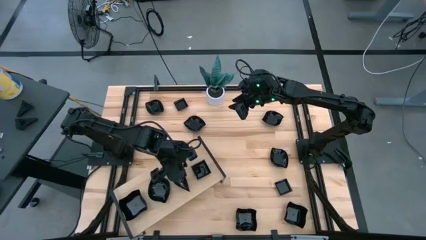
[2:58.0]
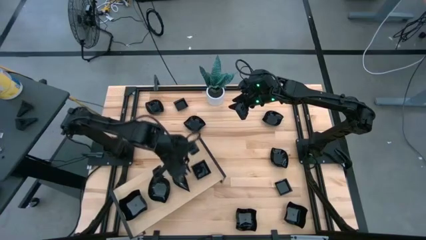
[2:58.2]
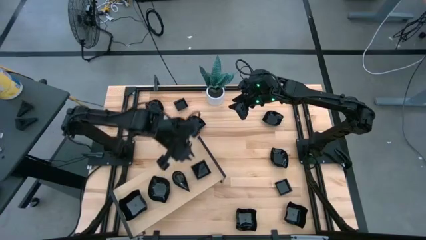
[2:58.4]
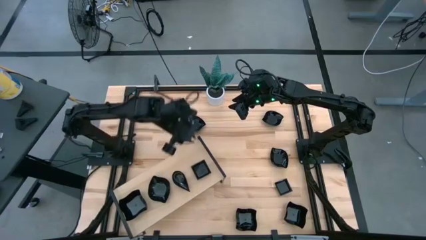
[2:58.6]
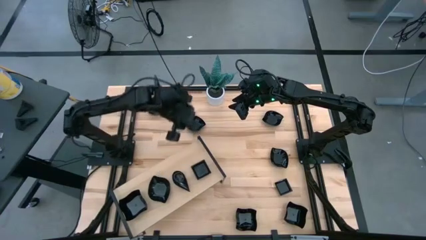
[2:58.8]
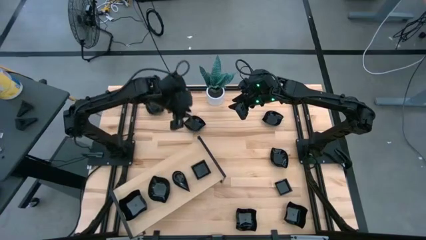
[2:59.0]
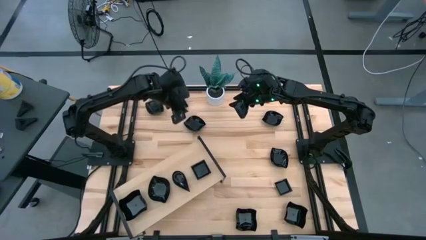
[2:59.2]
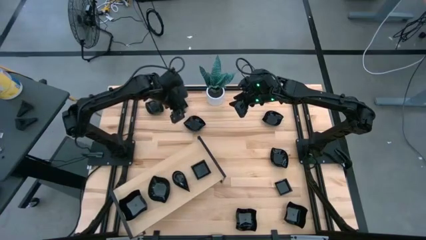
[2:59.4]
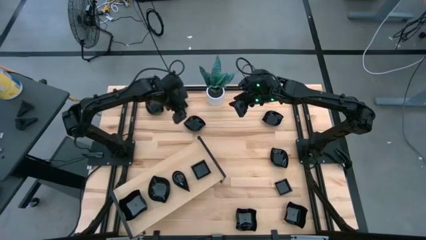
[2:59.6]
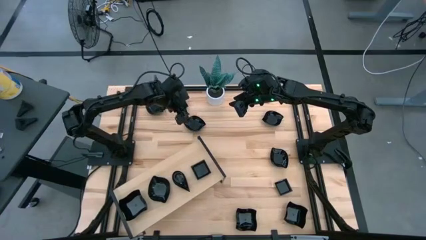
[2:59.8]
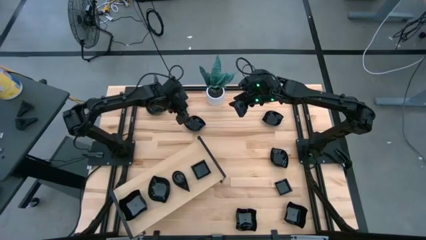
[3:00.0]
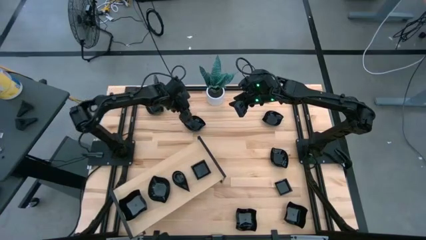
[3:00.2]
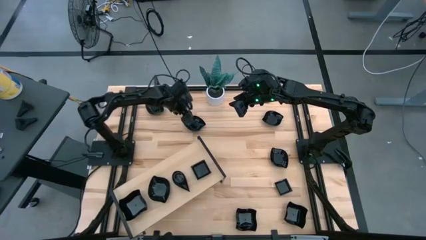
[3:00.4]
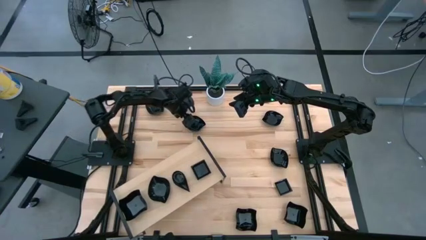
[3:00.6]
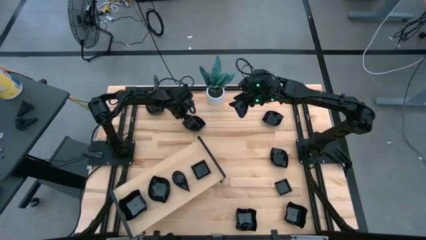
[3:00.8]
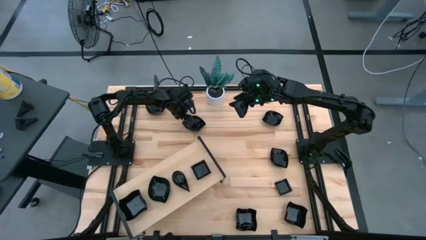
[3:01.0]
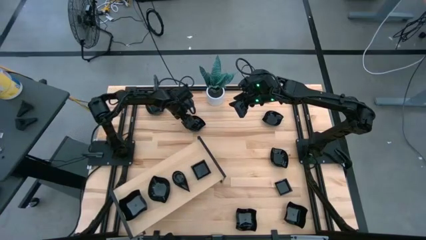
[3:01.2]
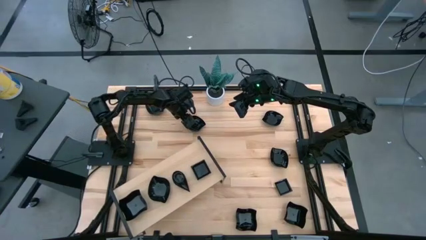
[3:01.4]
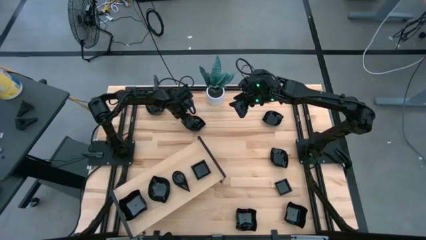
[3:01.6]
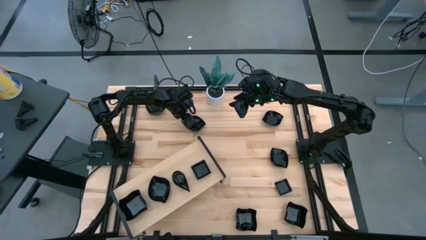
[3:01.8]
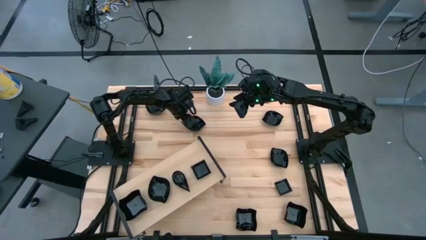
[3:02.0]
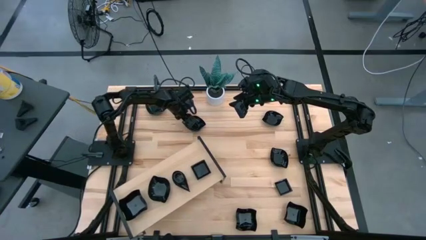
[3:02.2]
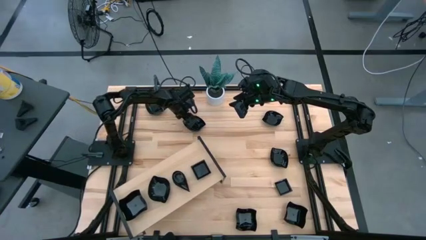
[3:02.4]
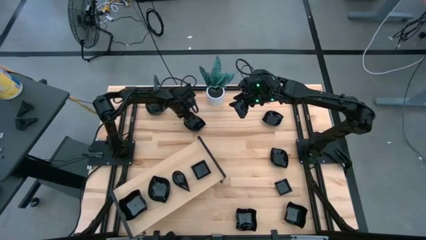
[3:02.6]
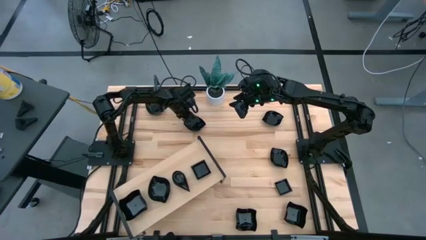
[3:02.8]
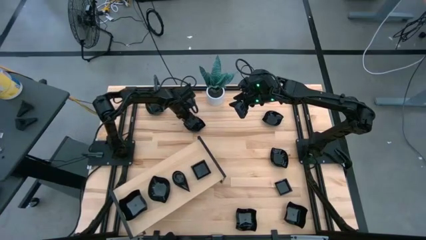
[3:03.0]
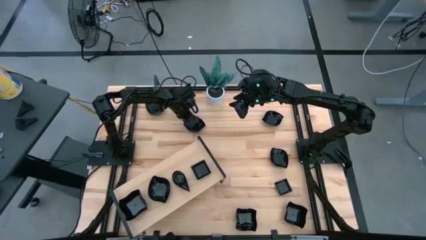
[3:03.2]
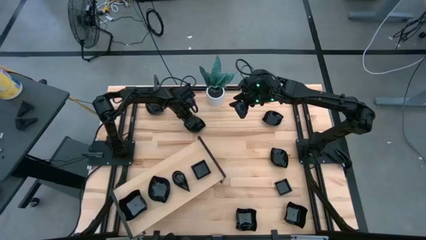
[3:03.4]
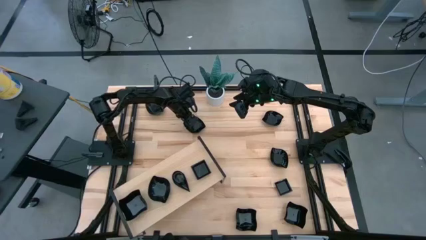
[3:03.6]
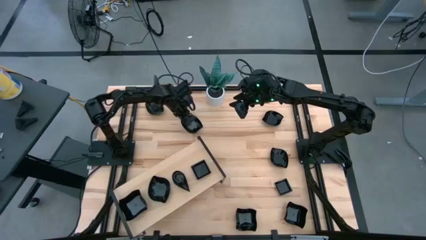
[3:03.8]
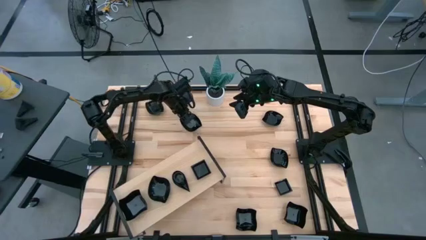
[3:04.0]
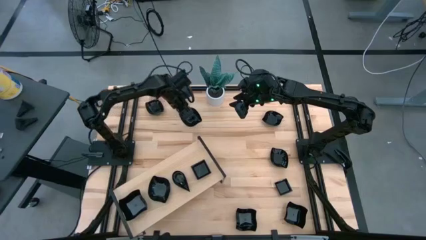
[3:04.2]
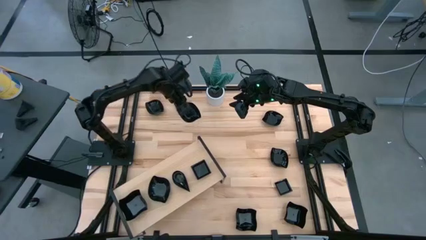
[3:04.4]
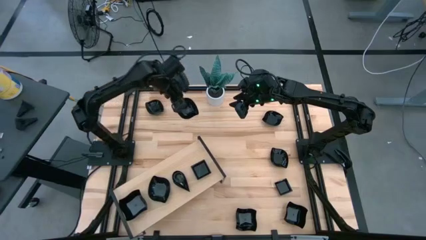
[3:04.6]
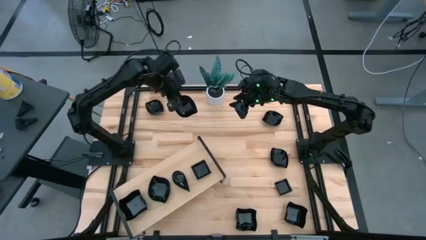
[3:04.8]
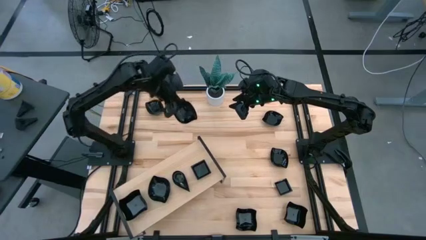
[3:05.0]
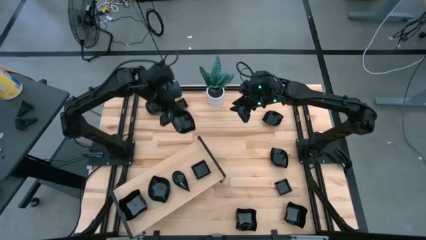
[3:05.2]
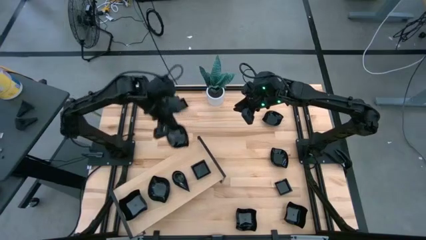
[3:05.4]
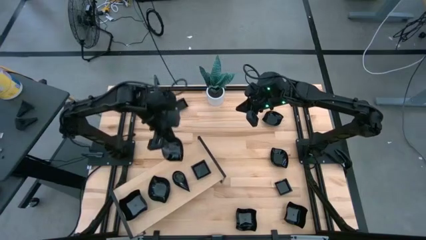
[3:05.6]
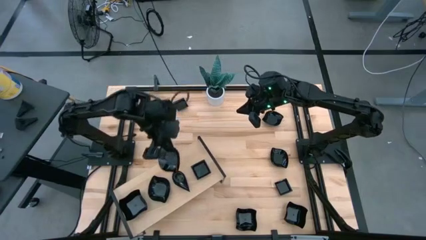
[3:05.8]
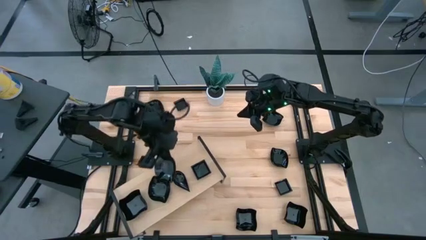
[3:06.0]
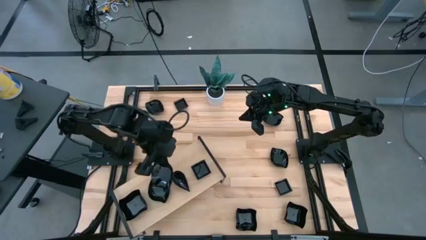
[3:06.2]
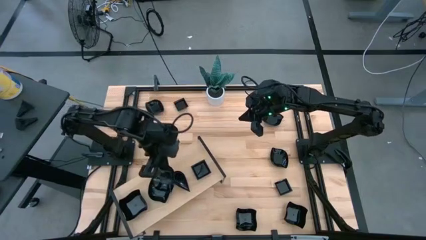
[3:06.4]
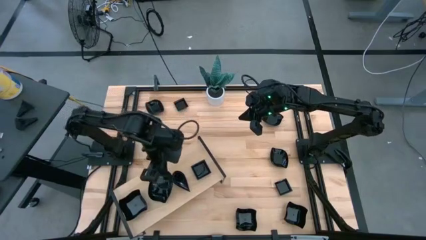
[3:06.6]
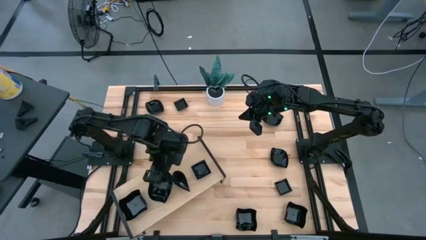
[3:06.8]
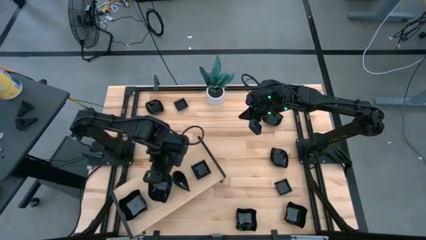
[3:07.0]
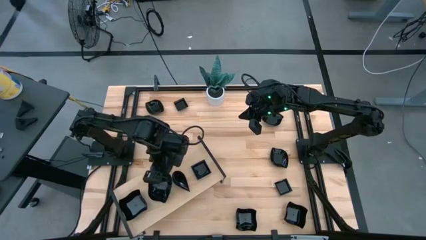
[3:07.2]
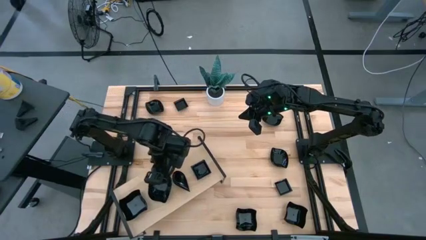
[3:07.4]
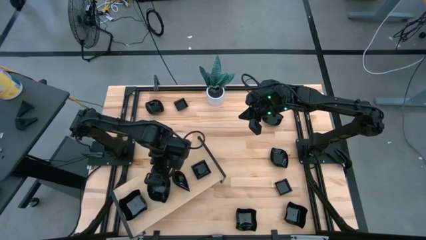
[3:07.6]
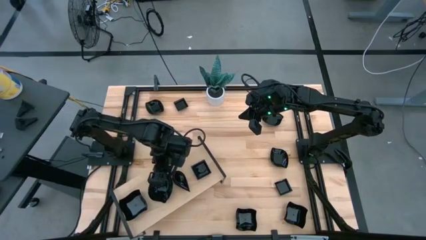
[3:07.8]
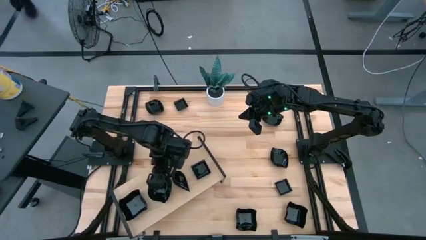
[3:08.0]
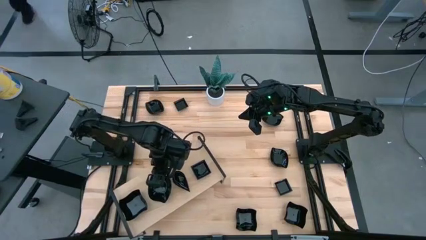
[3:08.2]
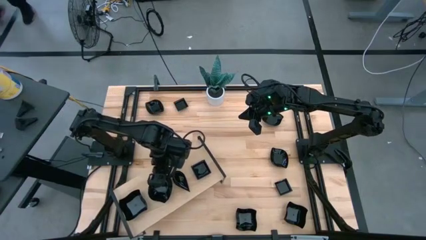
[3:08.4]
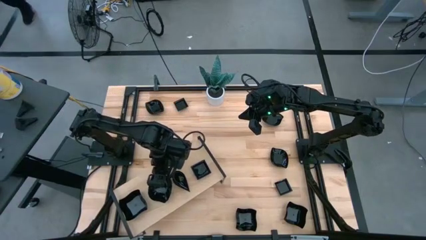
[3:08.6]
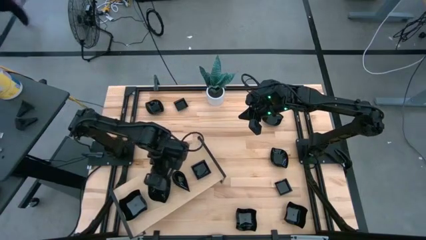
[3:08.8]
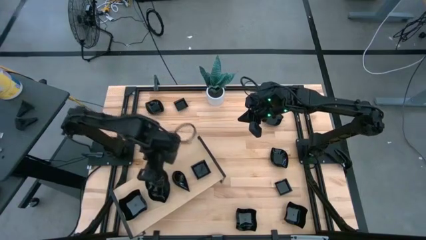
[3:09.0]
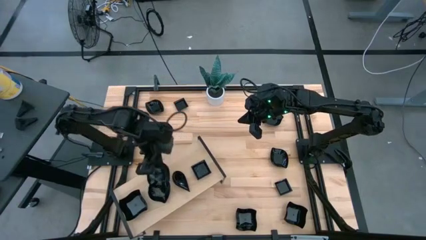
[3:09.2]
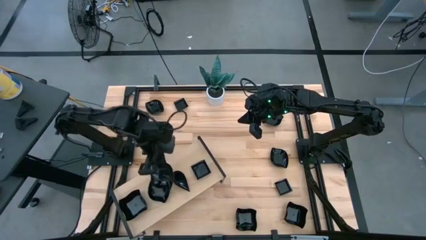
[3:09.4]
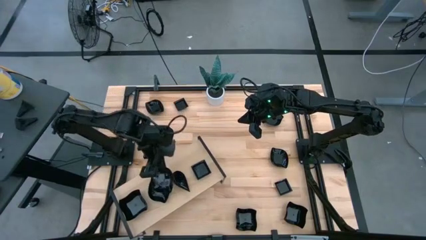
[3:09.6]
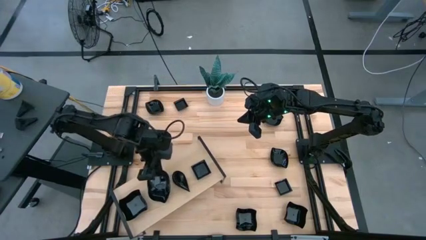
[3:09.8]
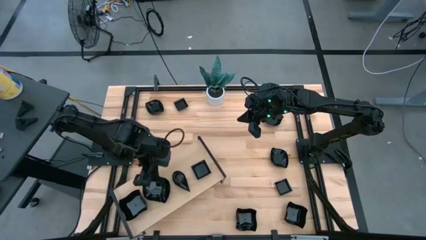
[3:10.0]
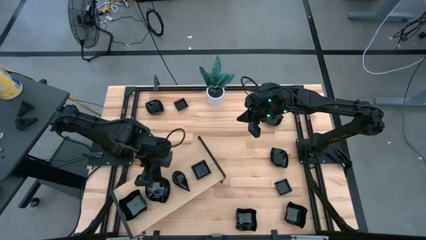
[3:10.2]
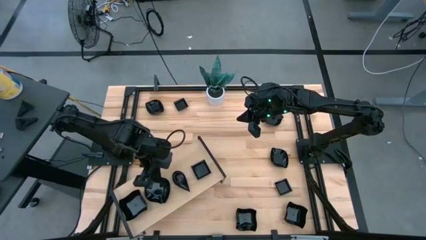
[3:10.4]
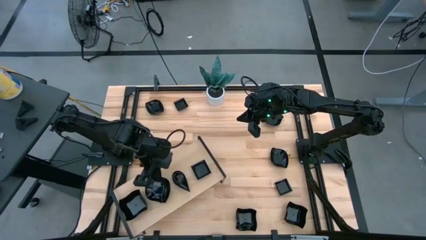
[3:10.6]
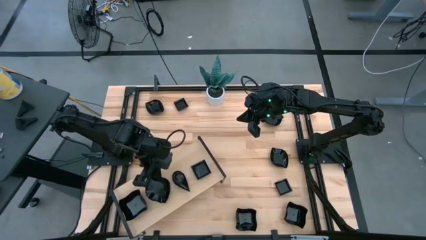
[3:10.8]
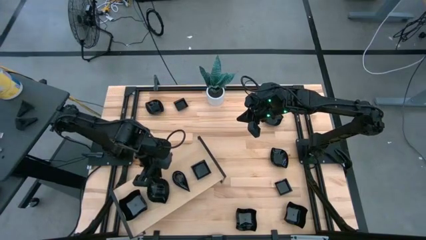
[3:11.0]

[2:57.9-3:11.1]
Task: Pick & Place Mini shaped plates
Stack the black leaf shaped plate on top of the black leaf shaped plate on the shelf

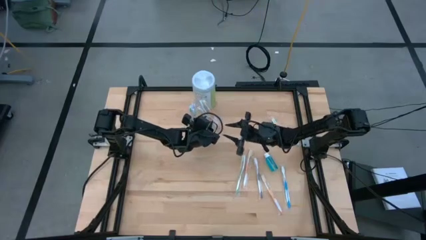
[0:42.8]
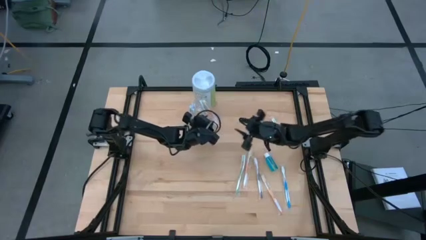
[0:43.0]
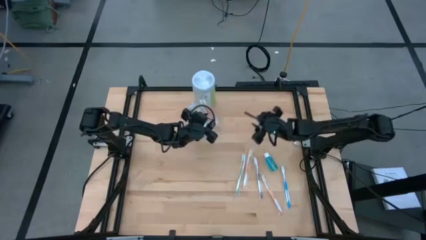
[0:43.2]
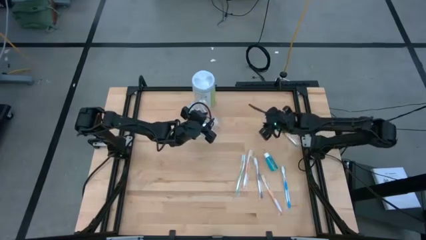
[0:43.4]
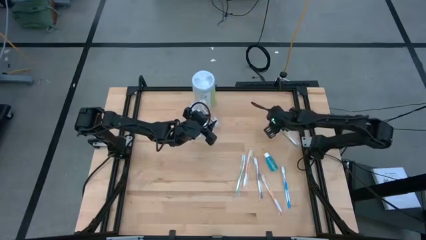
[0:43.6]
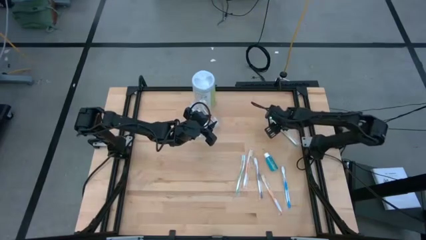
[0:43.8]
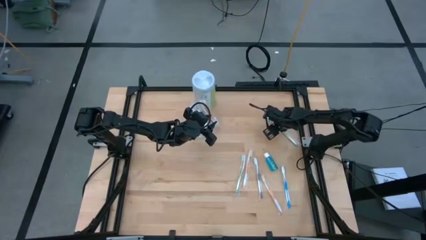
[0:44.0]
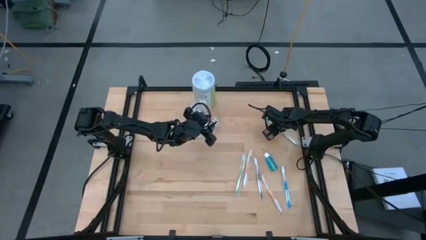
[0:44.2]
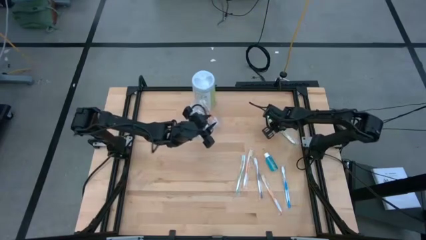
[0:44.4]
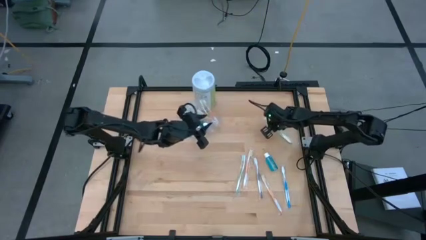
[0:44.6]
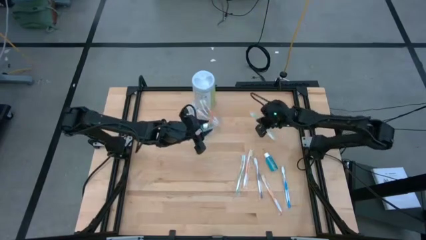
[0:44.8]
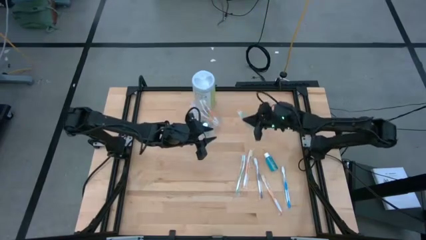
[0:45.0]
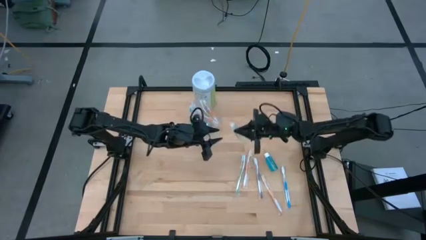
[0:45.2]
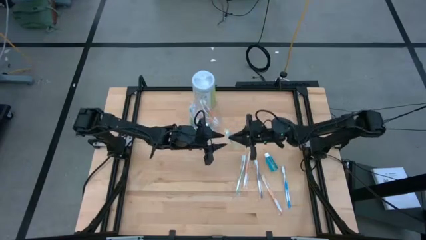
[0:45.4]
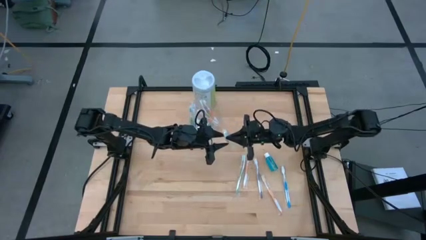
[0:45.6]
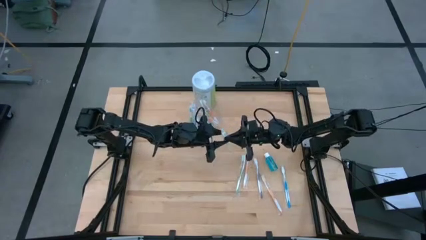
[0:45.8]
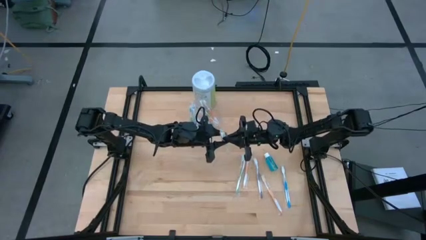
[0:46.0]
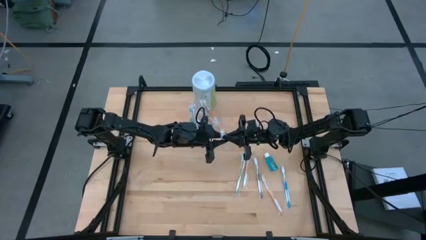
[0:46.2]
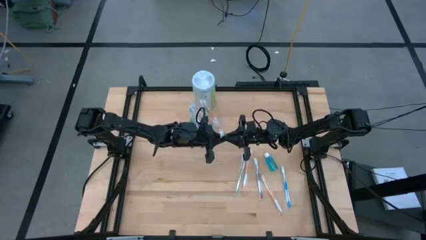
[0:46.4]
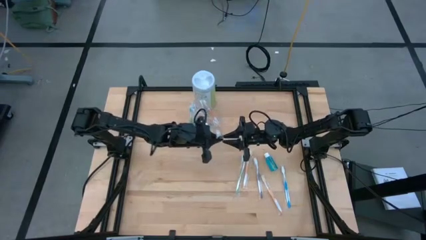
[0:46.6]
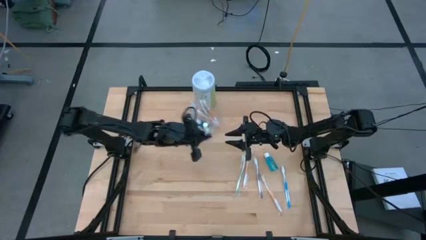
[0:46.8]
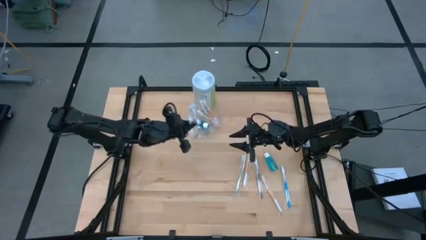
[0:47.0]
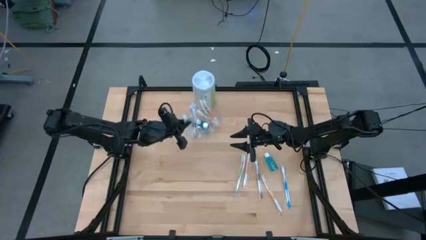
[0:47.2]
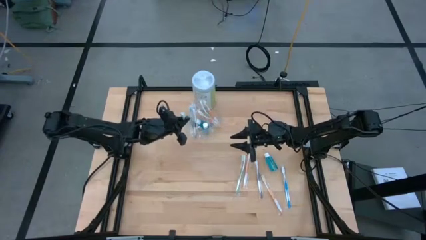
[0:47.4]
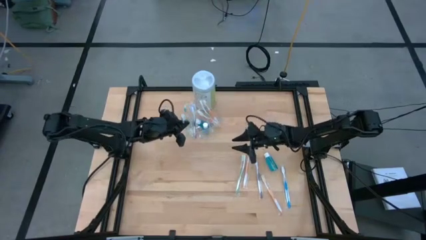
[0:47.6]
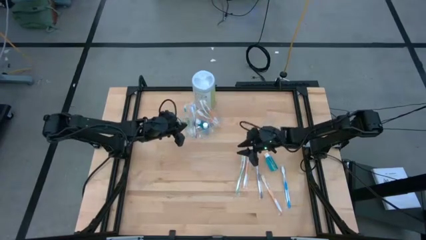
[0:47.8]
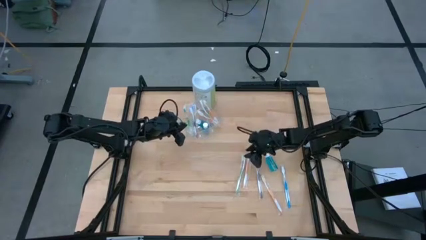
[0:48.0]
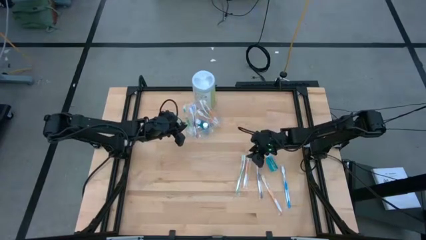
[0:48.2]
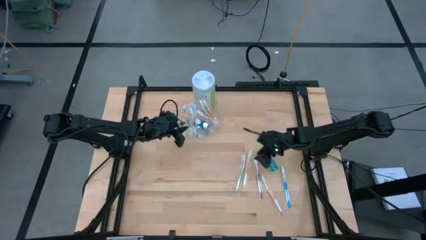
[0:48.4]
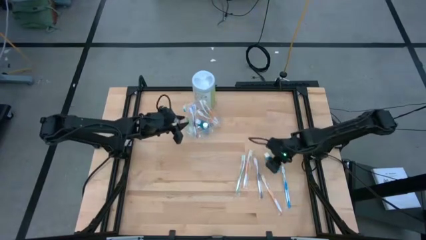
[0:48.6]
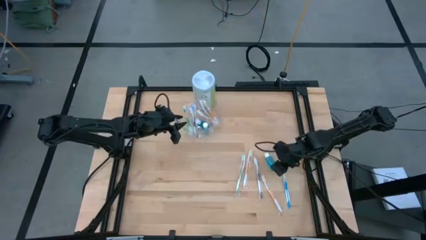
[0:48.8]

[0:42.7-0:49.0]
Task: Pick & Place toothbrushing station
Put the green toothbrush into the transparent organizer
